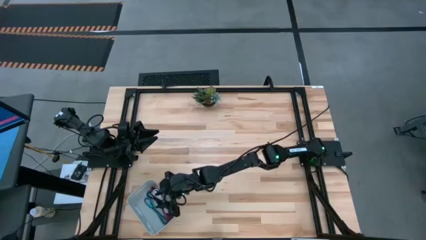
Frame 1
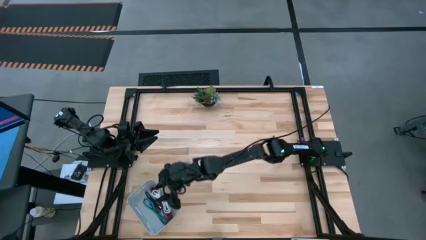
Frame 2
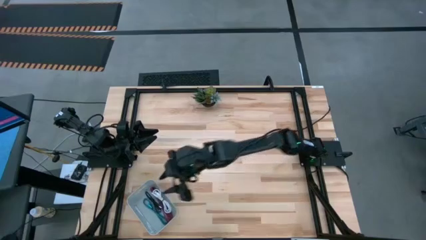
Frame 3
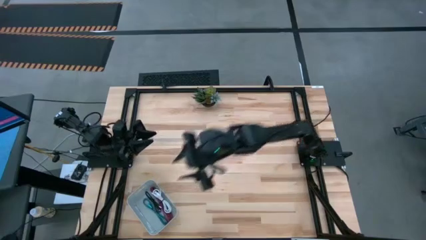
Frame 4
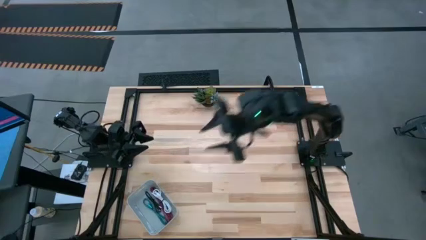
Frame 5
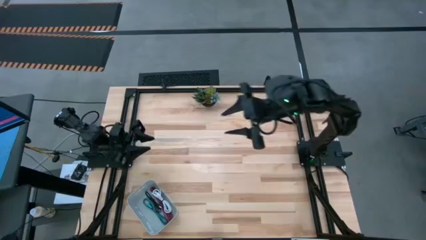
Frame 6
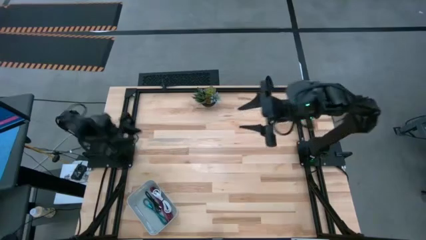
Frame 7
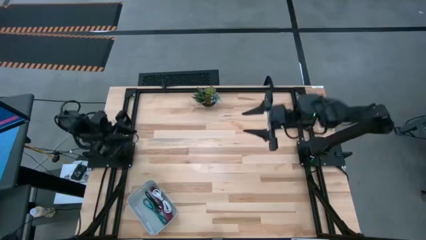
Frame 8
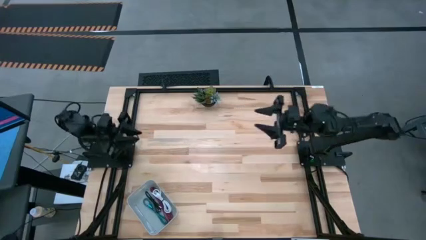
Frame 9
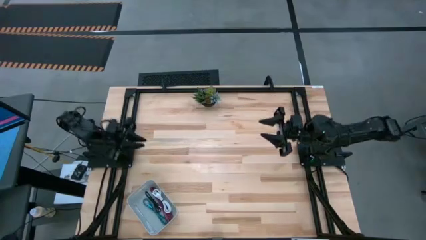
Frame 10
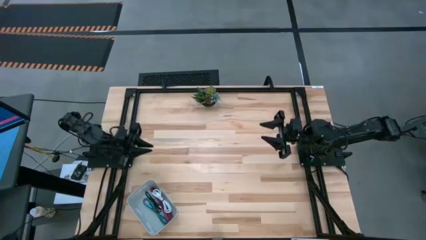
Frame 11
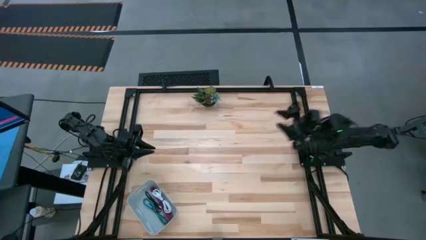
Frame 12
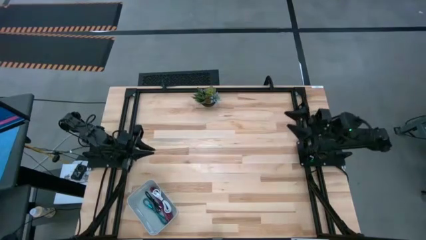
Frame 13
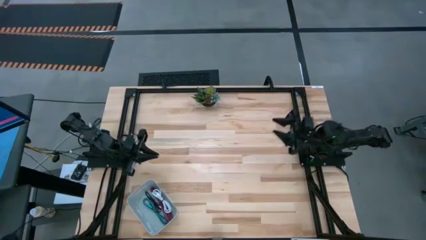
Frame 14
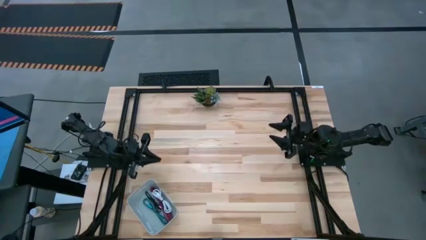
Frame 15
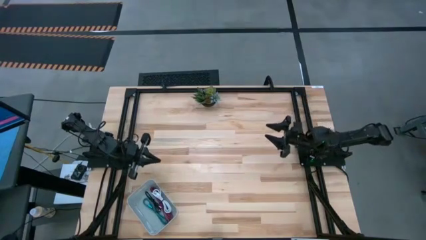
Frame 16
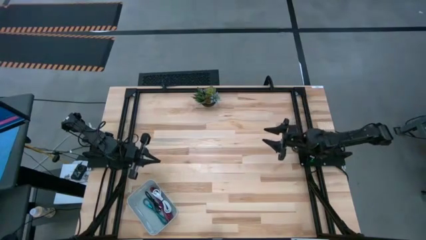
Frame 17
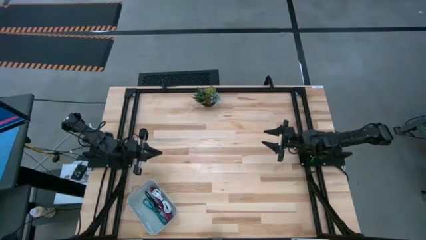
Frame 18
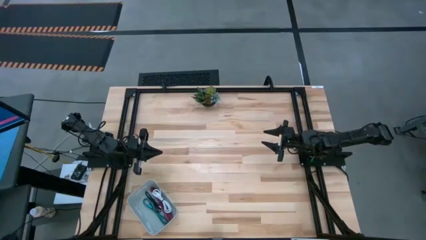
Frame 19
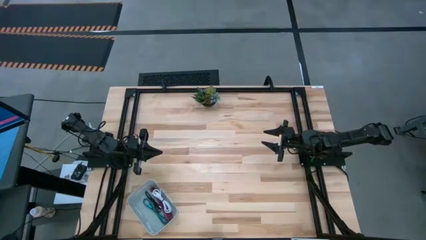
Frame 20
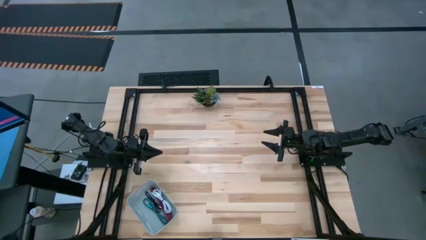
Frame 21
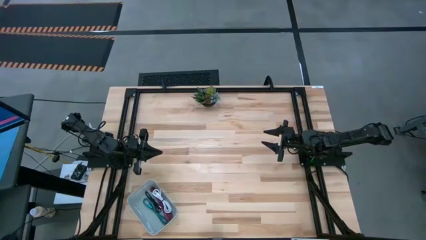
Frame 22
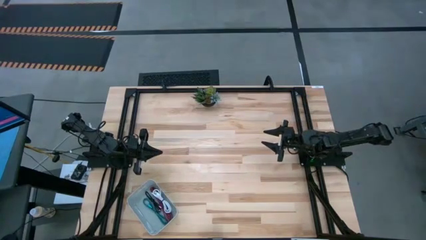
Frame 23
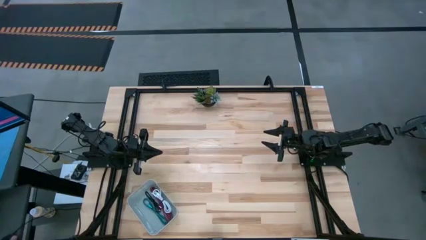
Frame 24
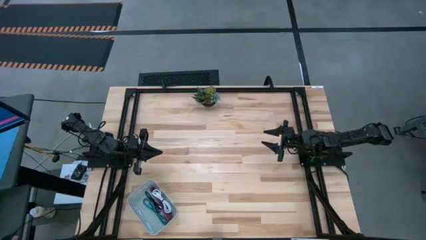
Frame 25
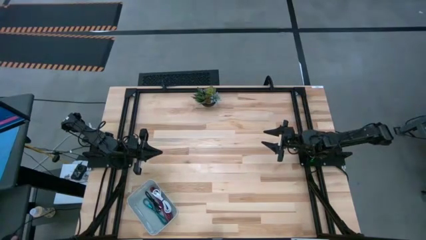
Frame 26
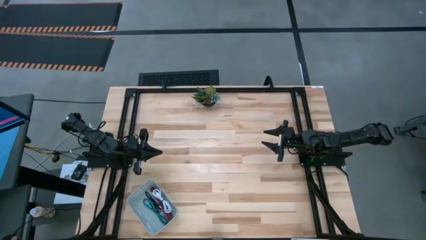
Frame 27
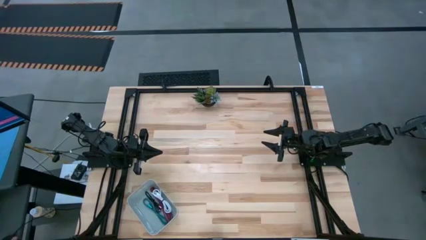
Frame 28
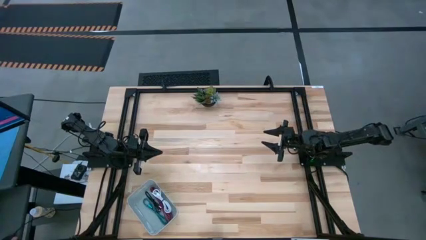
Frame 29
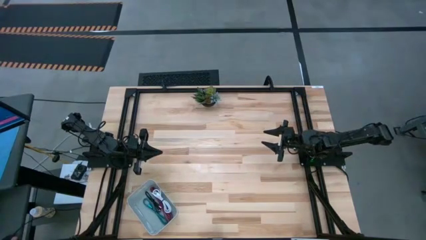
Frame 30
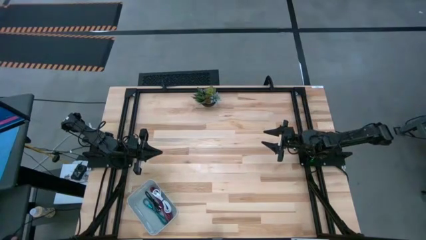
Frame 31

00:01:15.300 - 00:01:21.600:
Task: Pick and place USB-C Cables
Return to Home Position

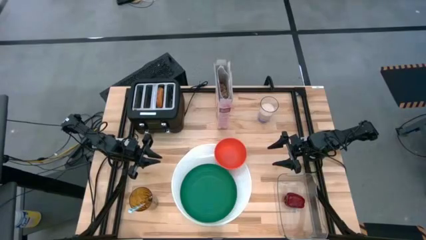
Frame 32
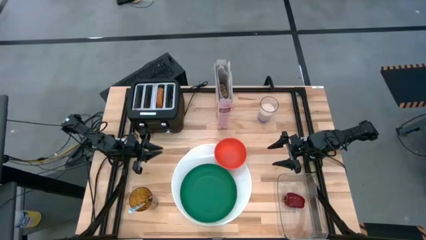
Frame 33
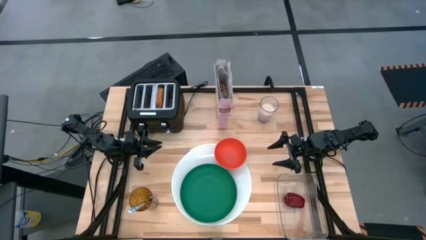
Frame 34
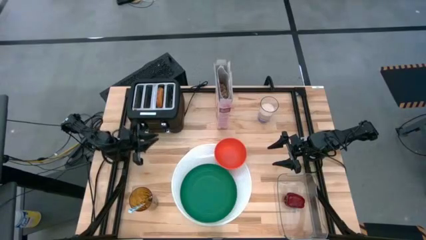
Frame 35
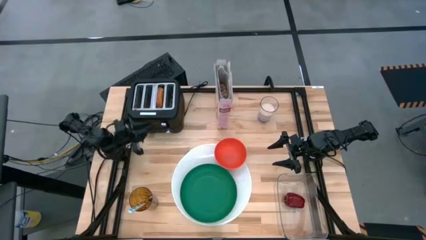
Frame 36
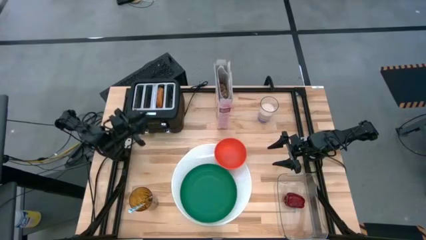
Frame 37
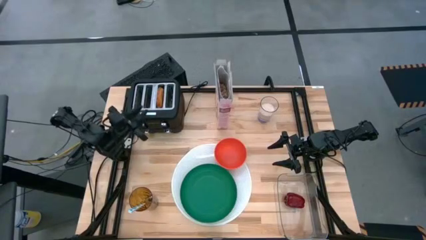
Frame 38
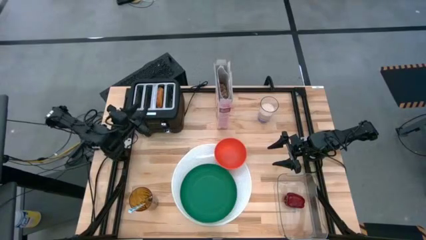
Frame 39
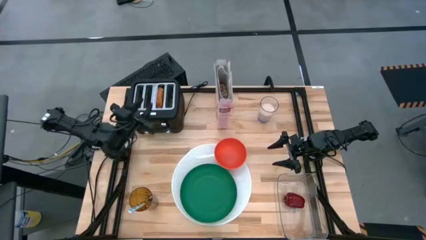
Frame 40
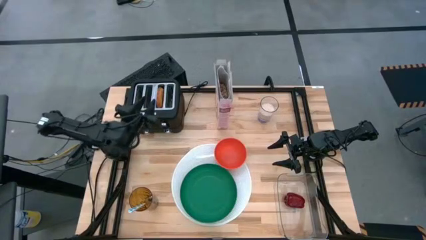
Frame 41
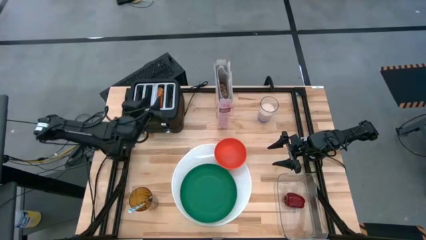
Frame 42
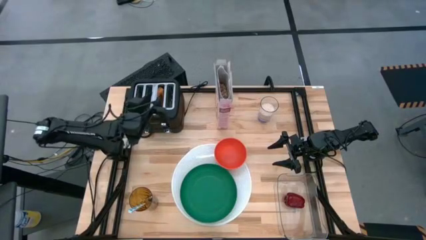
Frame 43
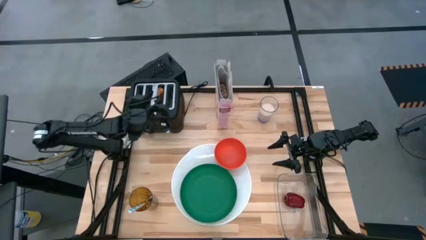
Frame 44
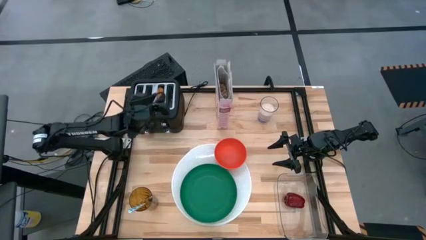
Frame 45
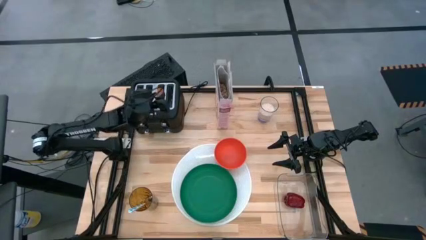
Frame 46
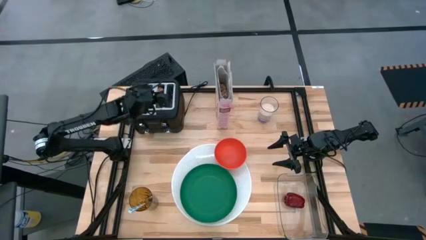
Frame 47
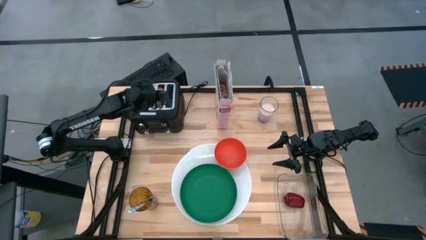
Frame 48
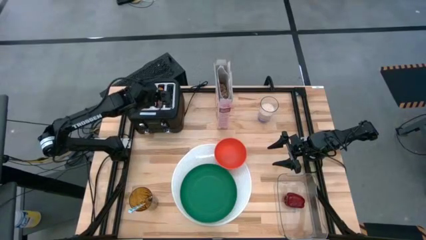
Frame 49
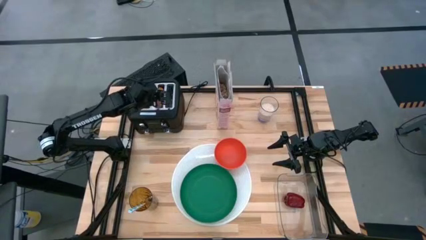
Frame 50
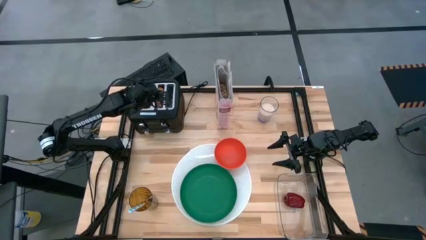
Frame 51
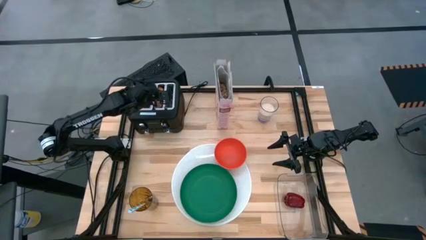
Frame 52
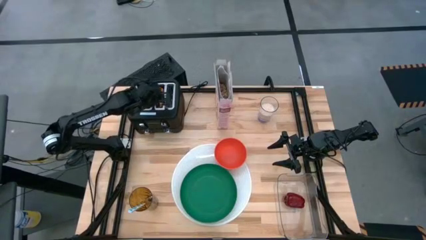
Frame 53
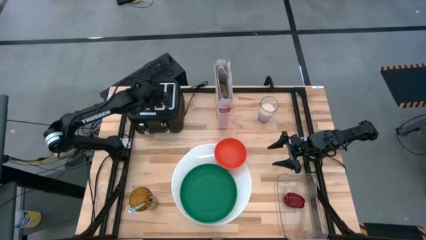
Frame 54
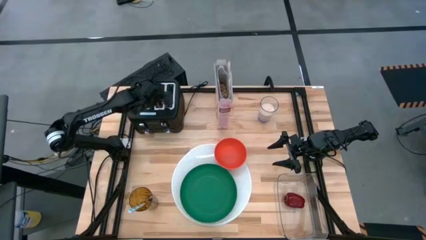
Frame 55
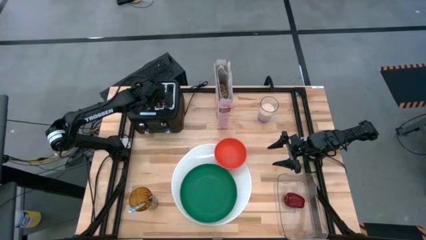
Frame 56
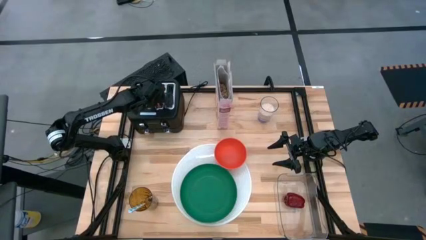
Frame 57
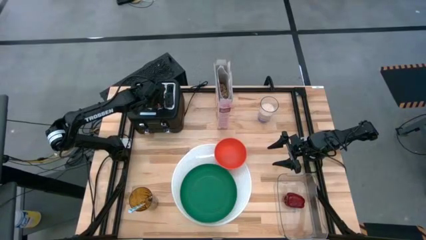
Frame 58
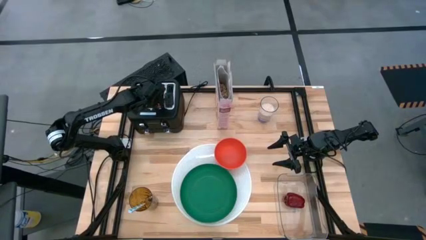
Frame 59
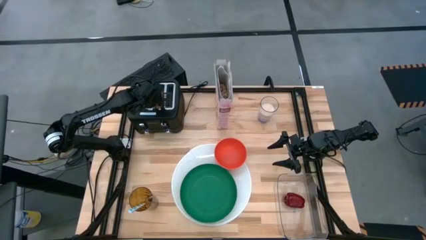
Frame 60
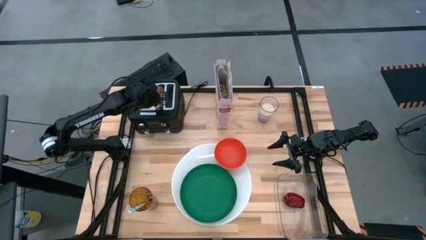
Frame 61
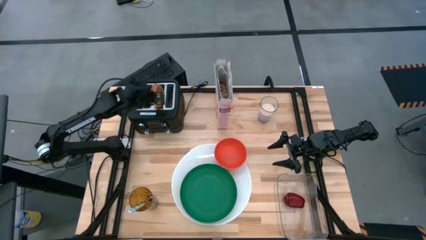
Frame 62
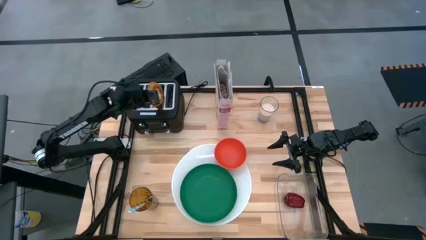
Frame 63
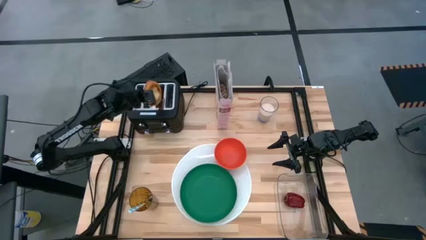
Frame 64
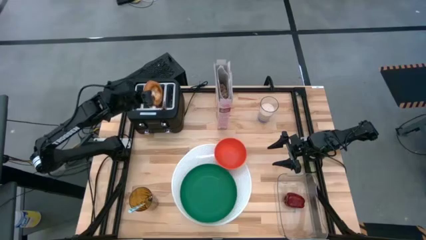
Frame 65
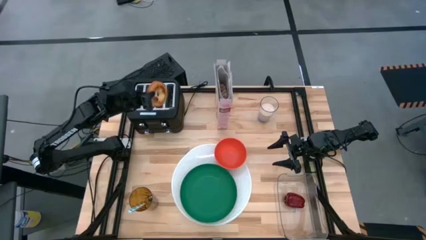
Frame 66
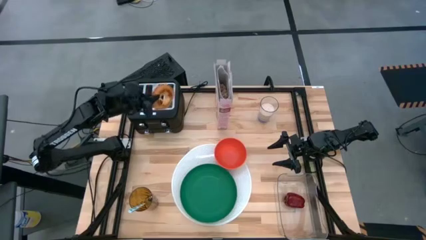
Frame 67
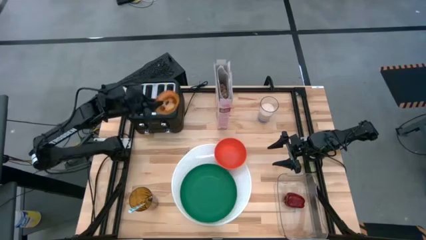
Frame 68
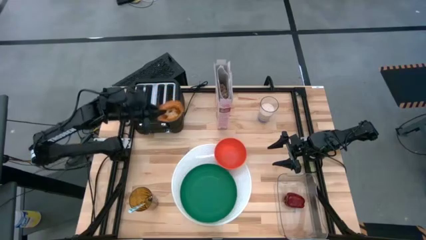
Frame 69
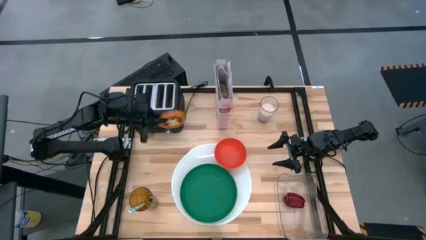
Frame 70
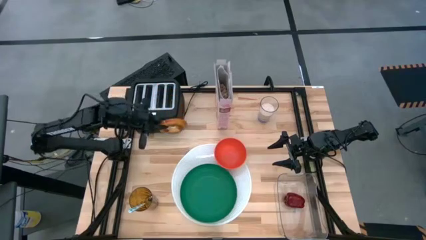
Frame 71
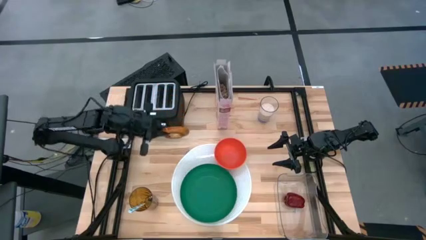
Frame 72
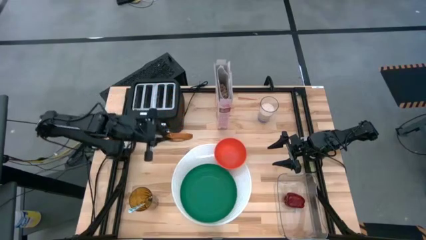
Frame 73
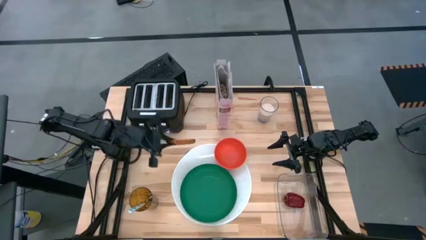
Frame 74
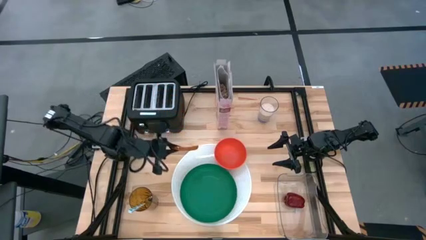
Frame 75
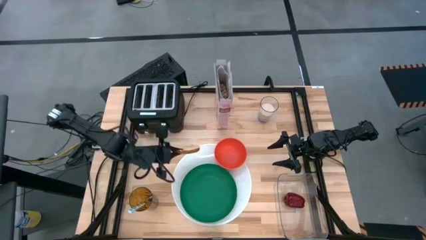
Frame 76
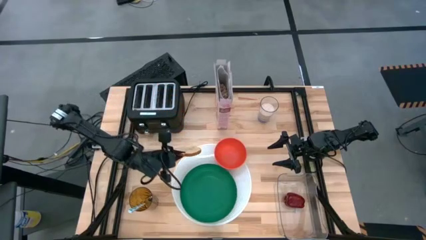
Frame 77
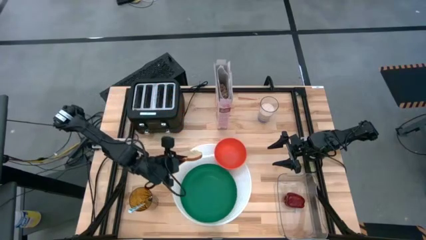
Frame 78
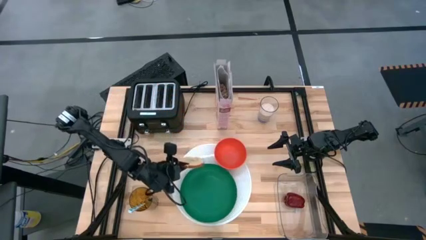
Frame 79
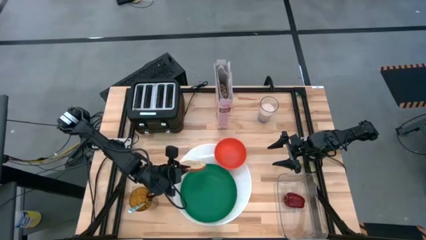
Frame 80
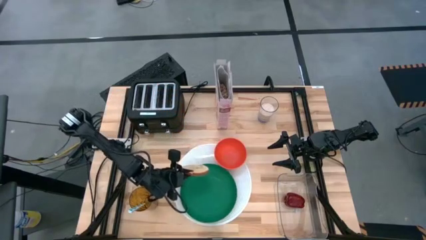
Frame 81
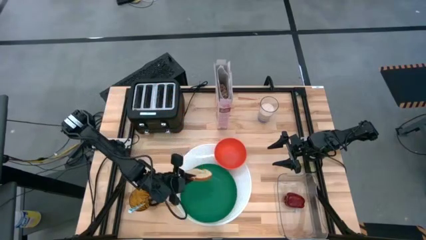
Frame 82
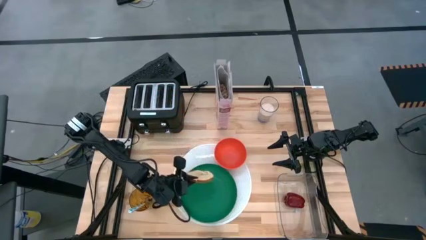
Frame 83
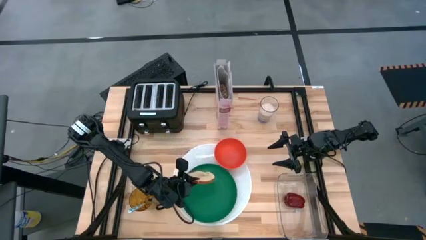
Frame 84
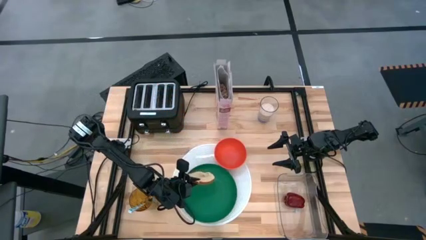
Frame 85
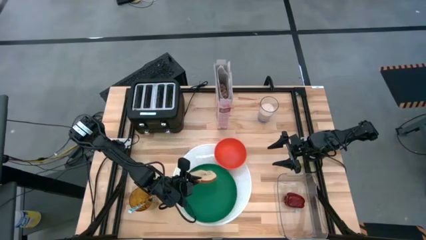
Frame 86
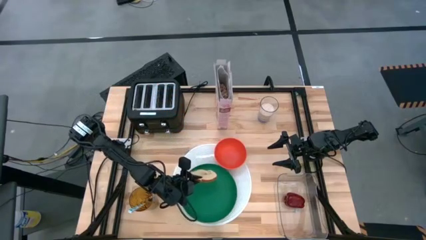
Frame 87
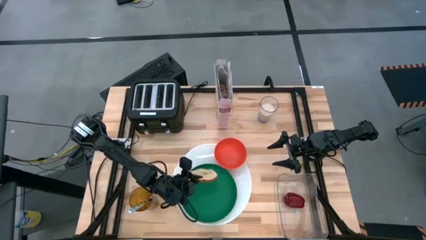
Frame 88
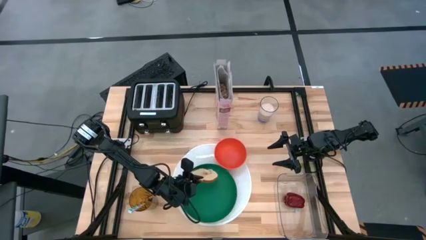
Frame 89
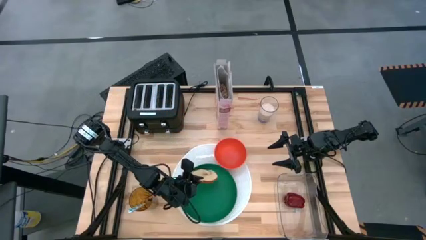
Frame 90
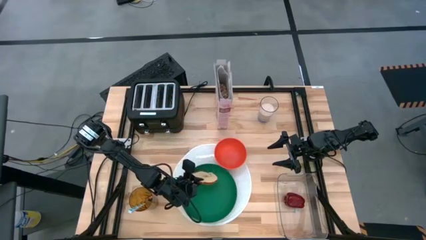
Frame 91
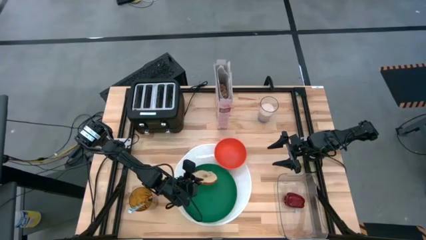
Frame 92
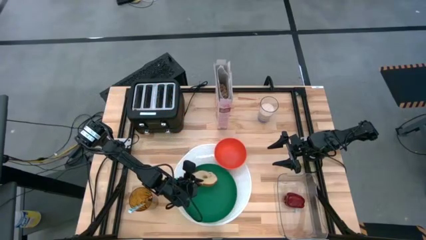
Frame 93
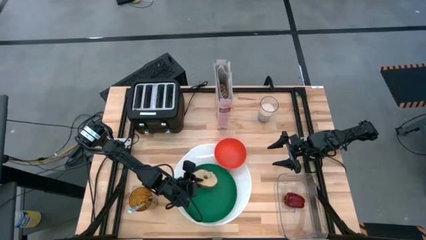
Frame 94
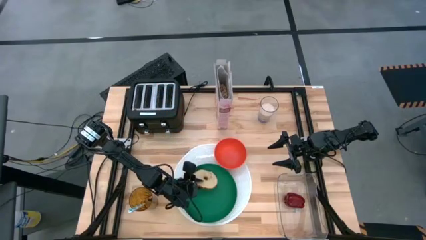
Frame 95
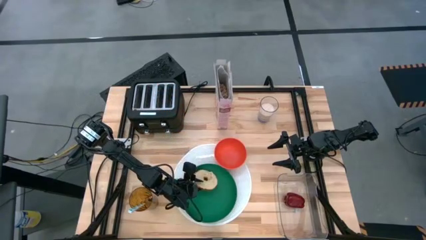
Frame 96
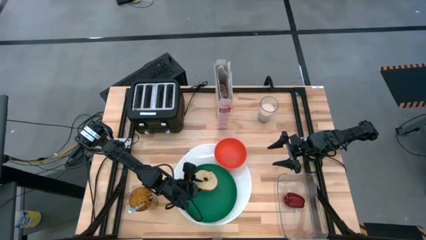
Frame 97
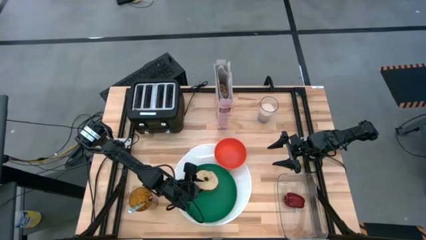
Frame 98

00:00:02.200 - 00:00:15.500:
Task: Arrange a breakfast setting
Put the toasted bread from the toaster on the green plate
